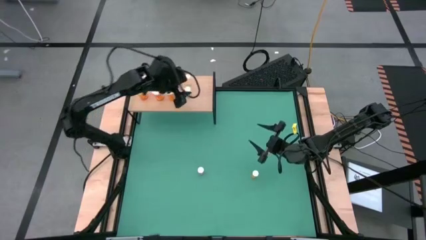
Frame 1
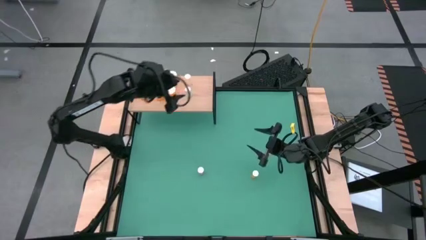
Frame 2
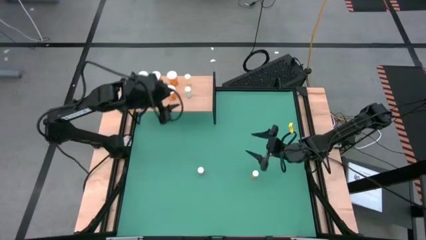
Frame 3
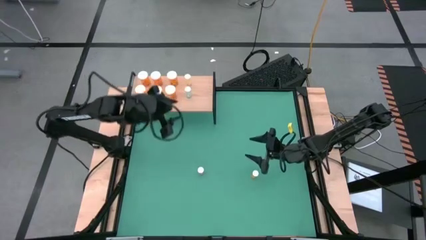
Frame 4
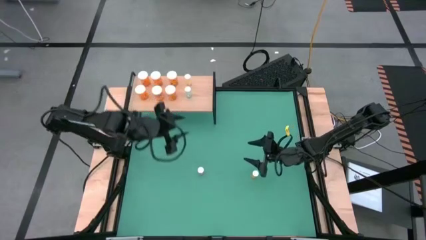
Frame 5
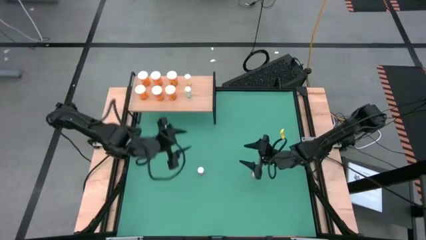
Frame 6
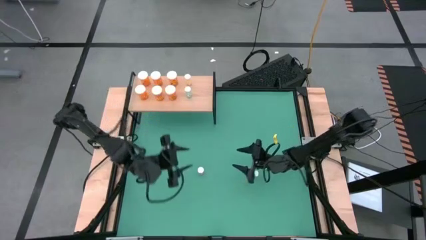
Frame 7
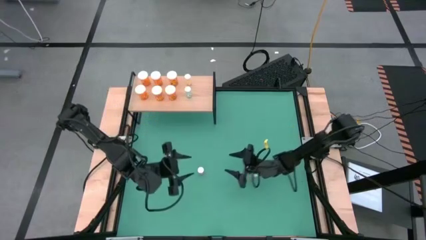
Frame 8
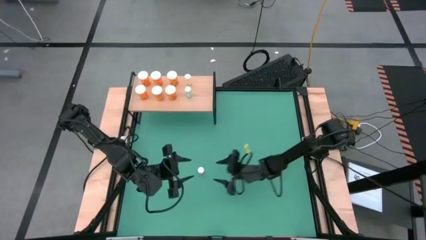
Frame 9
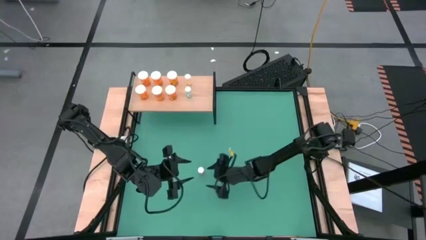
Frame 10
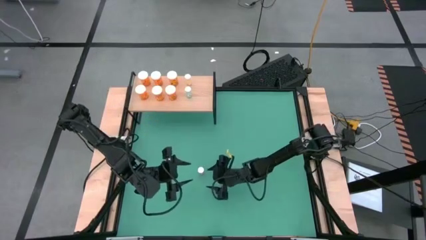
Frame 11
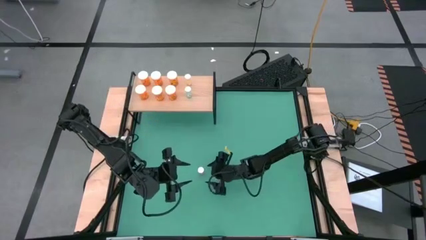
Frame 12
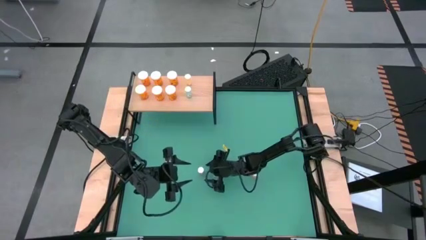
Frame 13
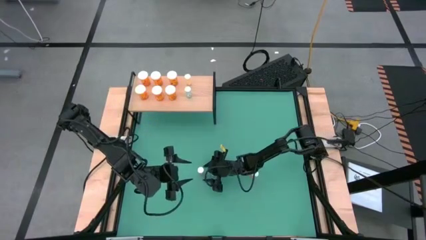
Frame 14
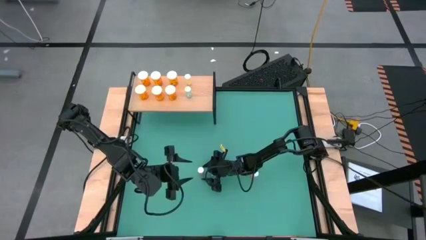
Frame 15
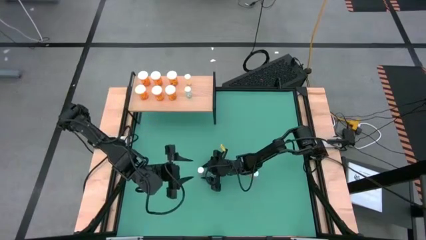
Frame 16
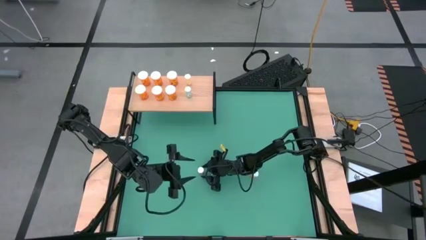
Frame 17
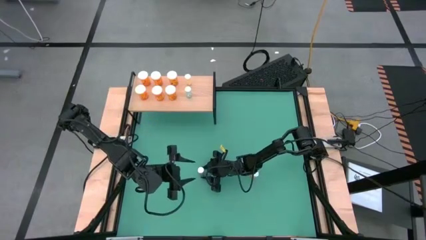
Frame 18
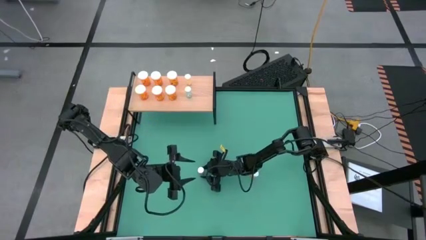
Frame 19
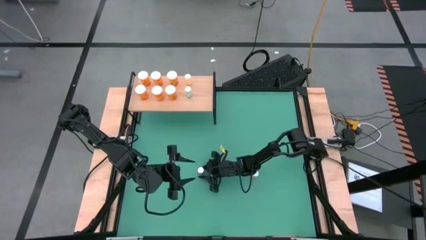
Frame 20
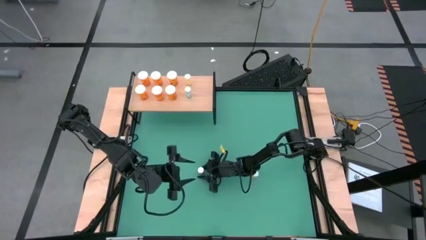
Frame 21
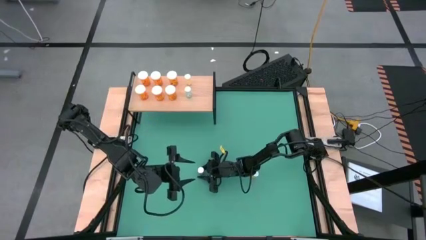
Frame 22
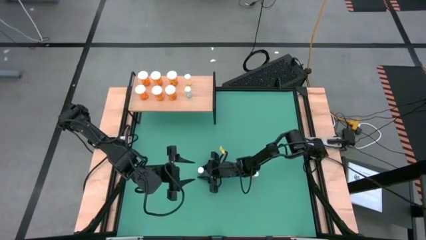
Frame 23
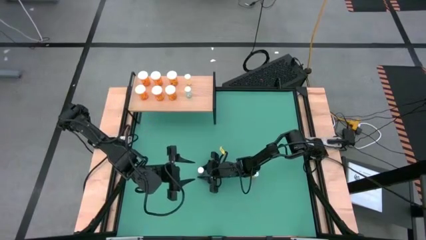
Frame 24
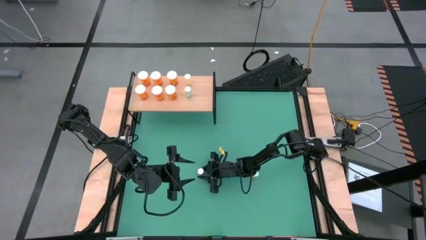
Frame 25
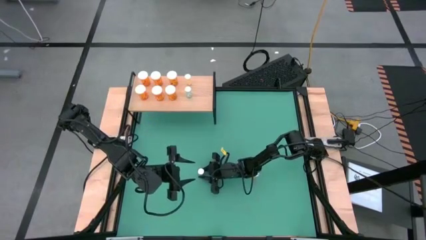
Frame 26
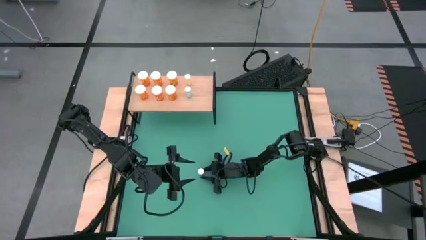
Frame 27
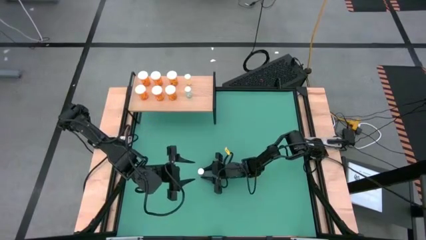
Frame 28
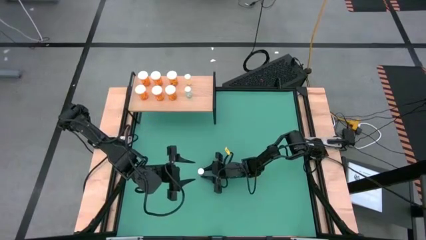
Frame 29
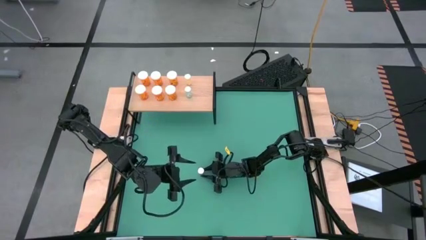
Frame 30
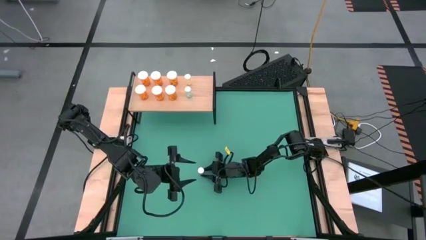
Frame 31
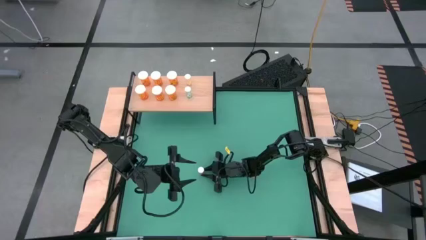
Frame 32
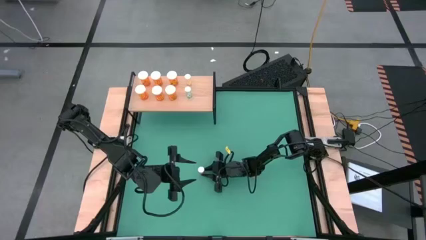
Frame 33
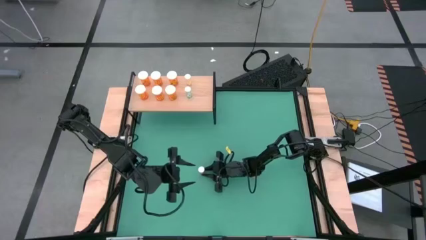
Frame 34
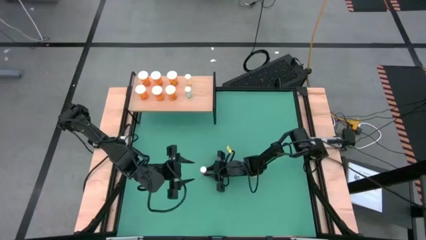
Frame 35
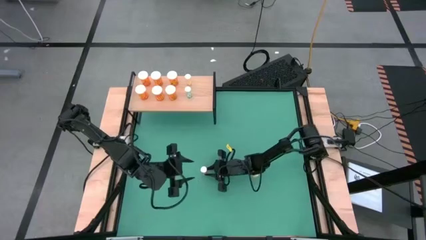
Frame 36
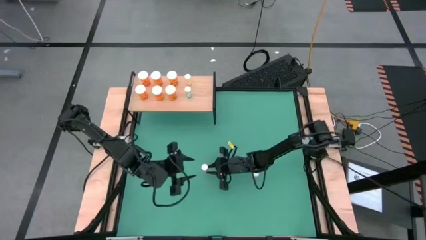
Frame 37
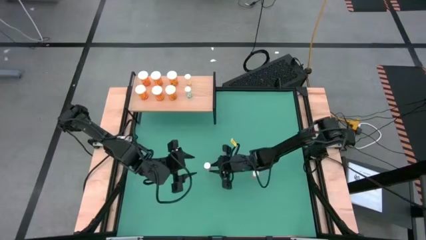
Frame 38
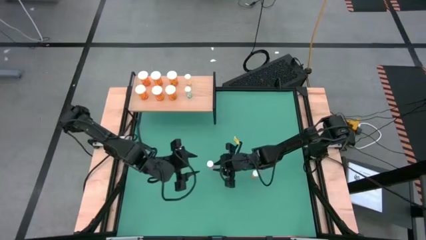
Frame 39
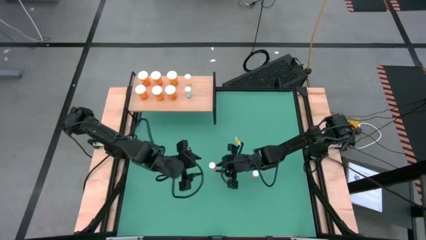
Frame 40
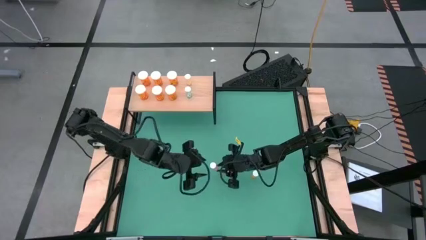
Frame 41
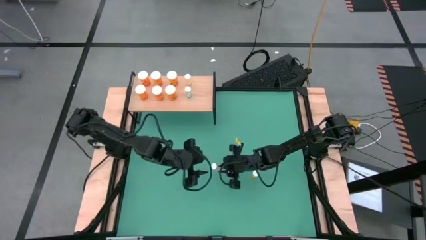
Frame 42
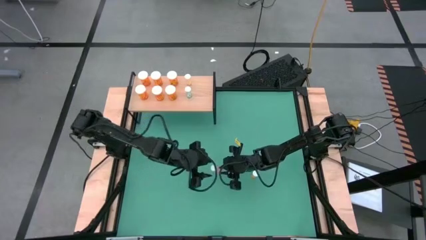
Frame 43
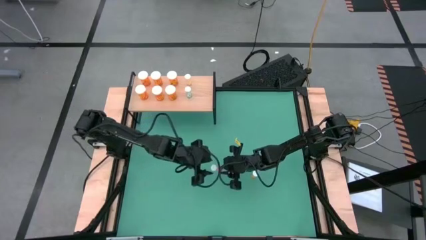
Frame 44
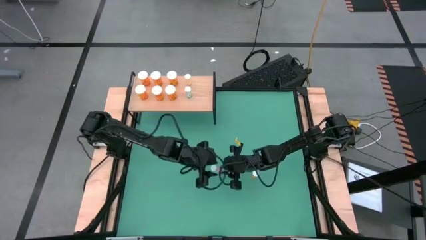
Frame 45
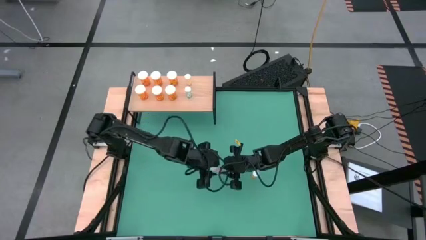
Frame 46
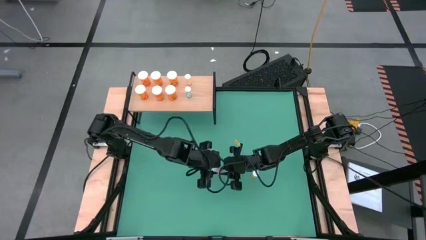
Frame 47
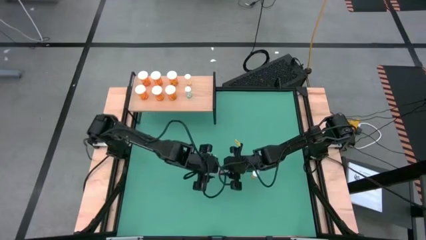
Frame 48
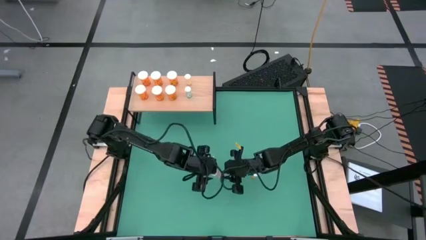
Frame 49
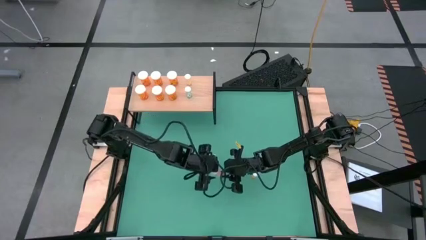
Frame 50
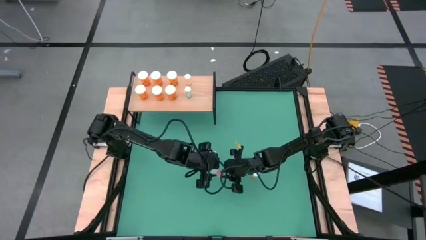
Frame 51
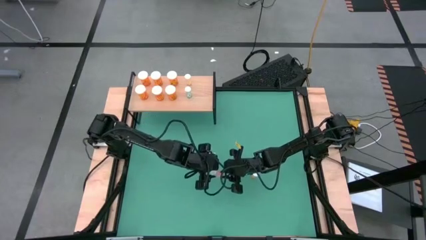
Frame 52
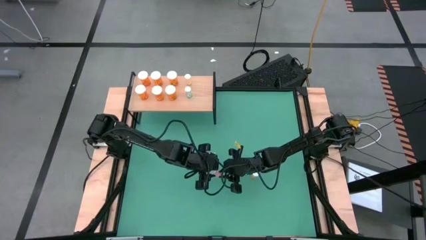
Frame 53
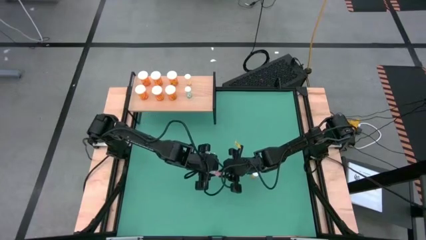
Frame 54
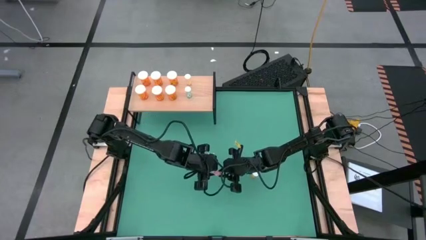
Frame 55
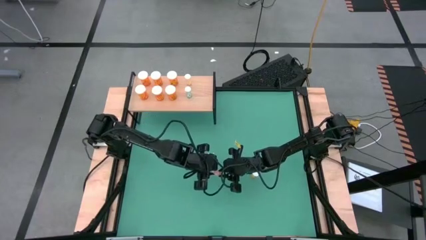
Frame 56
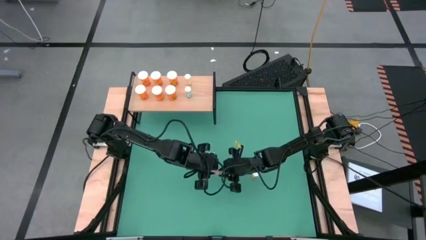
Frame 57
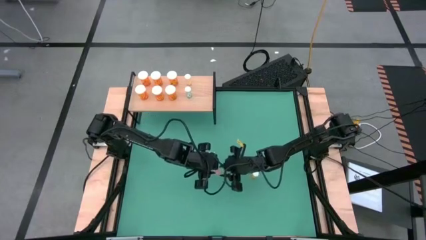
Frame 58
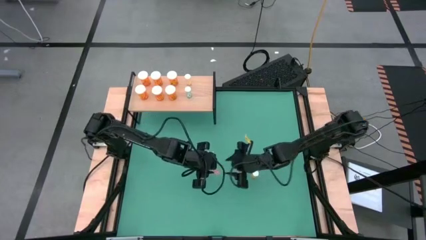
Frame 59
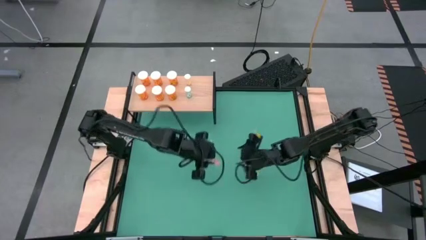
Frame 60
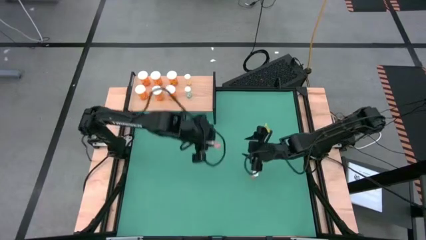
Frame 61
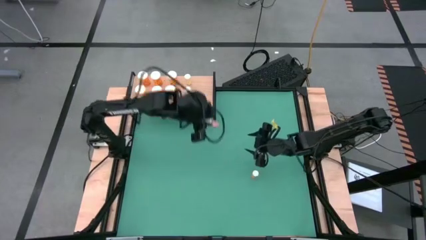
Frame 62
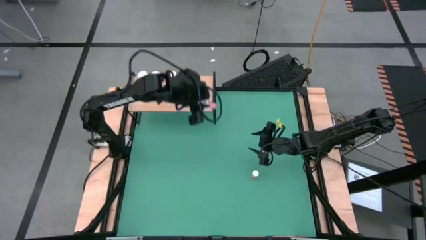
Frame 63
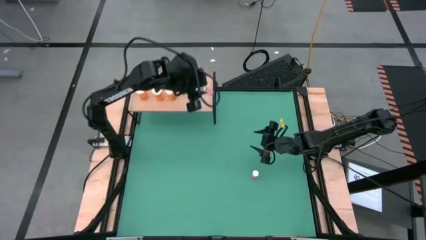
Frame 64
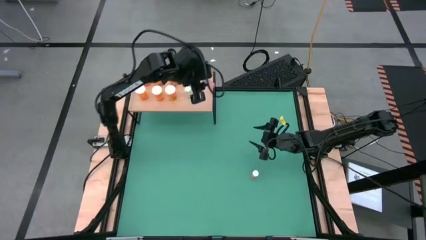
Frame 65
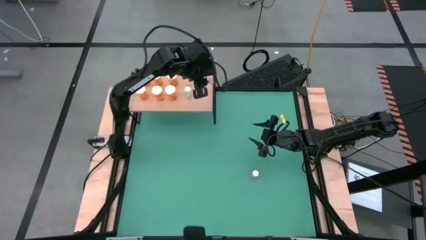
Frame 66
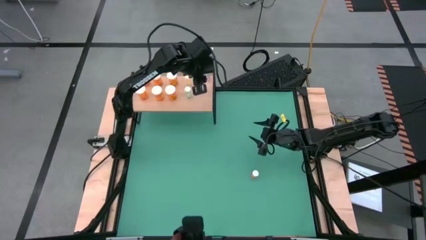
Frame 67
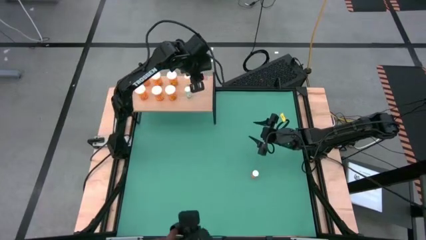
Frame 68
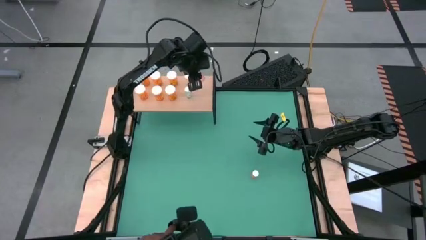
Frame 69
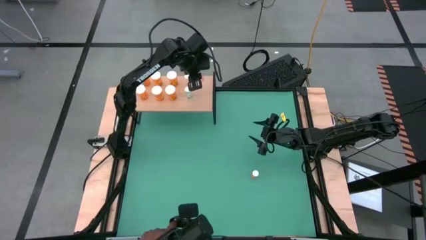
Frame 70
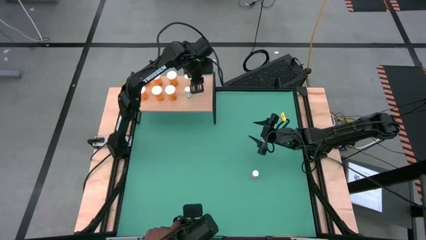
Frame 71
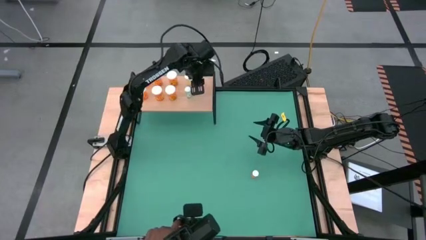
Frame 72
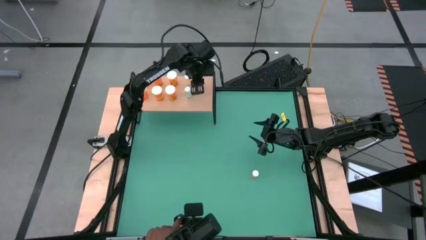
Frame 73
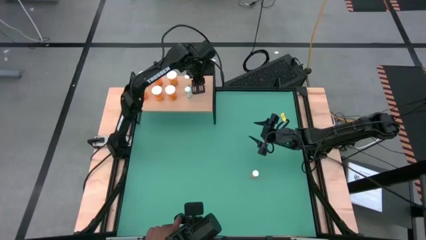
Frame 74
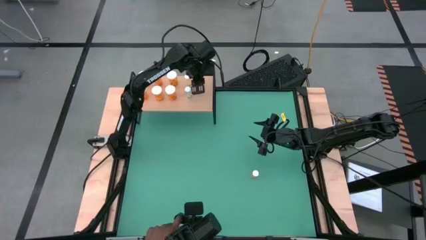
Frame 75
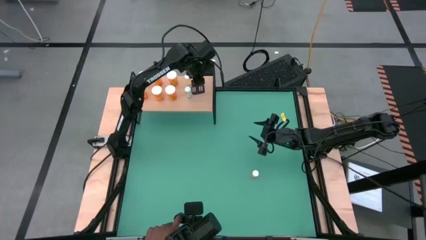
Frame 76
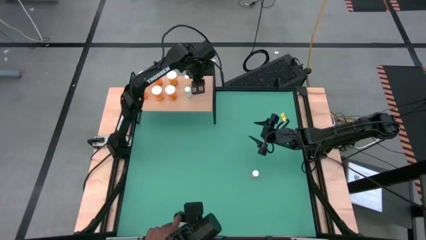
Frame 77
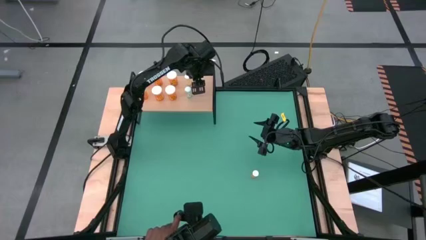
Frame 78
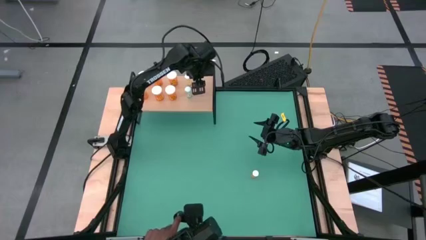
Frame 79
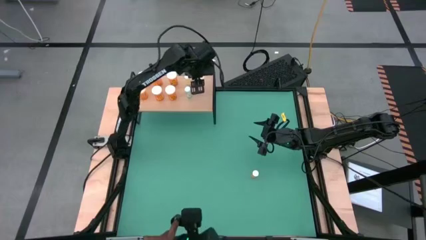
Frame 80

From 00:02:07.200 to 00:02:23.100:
Task: Pick and place medicine bottles onto shelf by color
Put the small pink pill bottle on the shelf aligned with the other small yellow pill bottle
